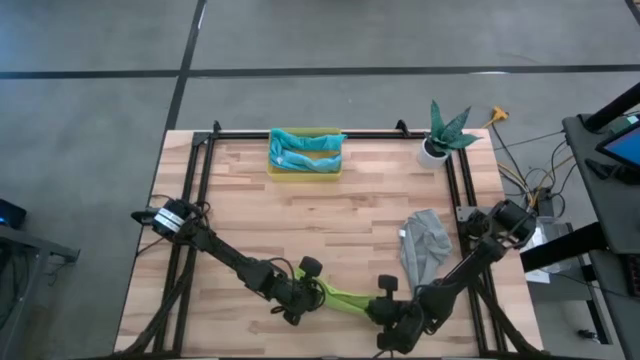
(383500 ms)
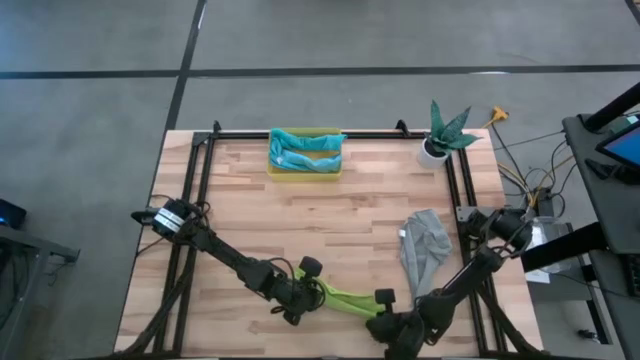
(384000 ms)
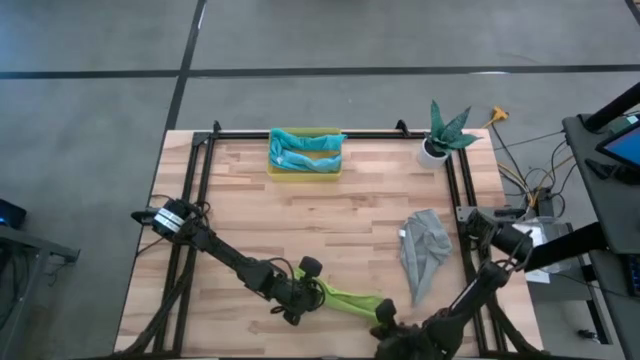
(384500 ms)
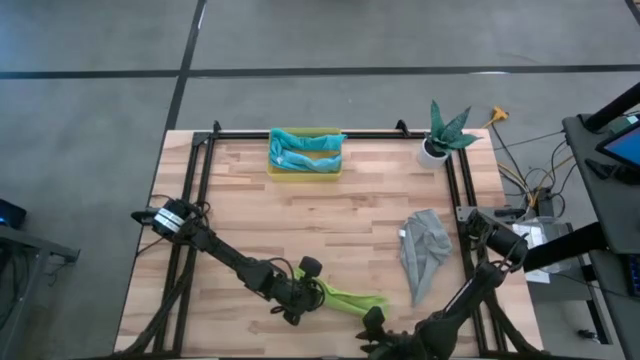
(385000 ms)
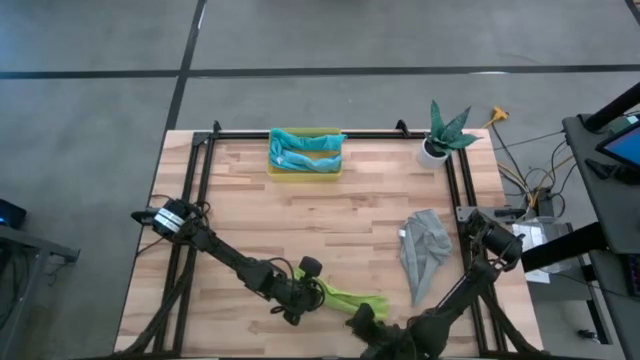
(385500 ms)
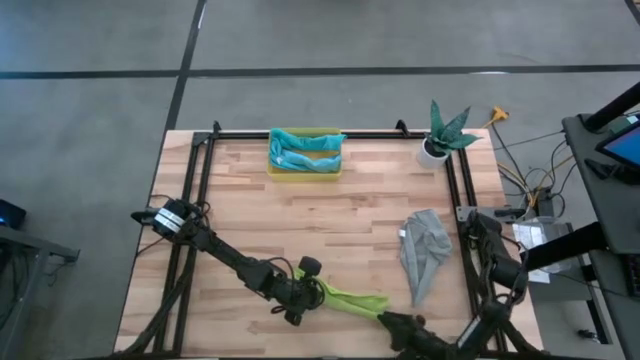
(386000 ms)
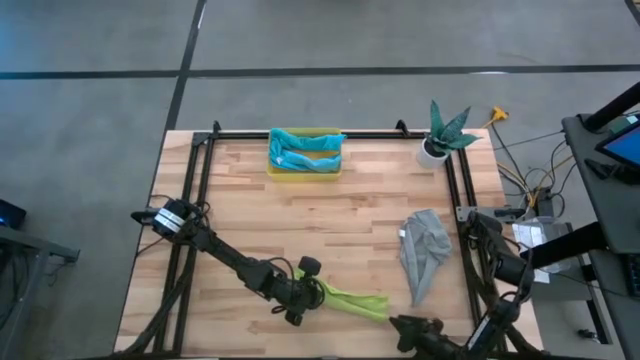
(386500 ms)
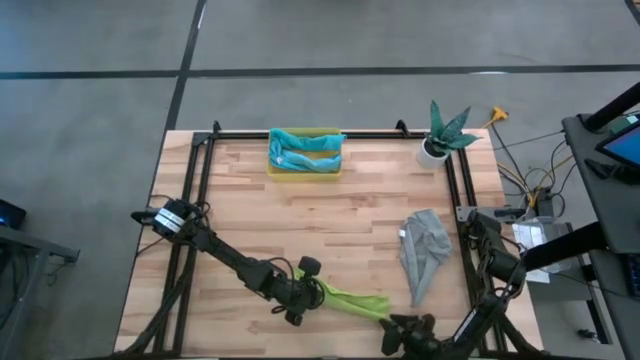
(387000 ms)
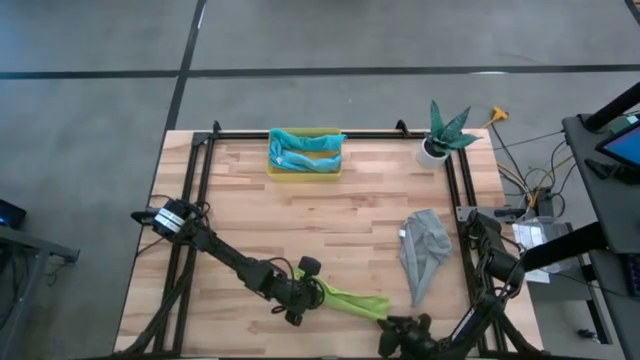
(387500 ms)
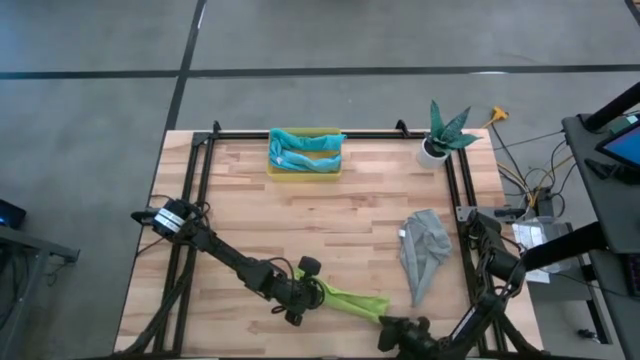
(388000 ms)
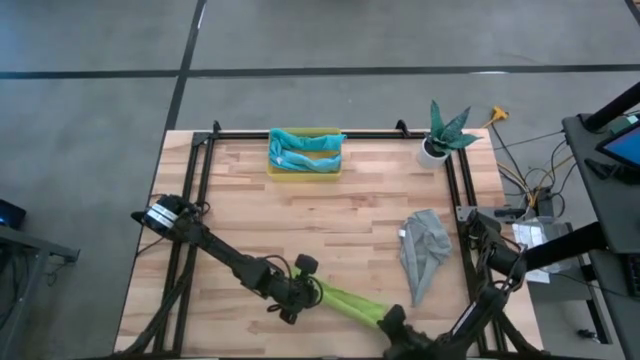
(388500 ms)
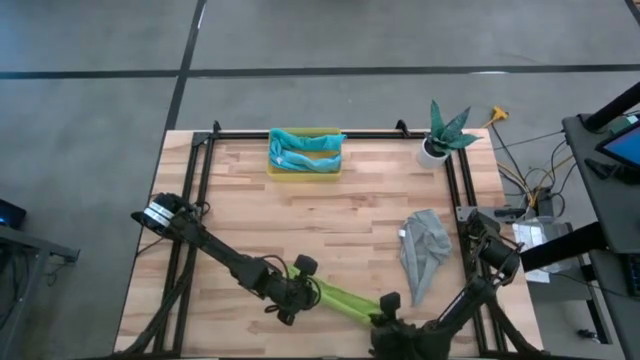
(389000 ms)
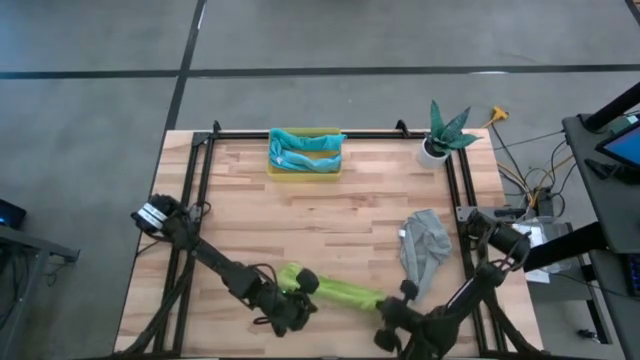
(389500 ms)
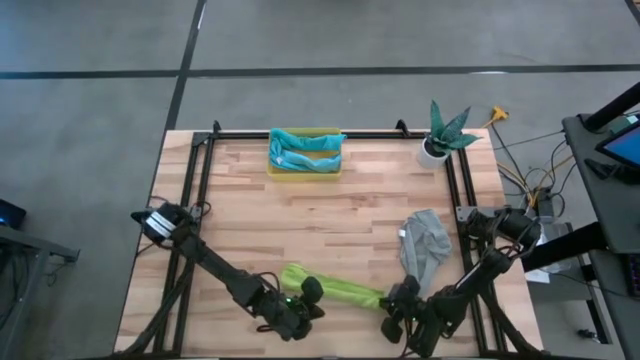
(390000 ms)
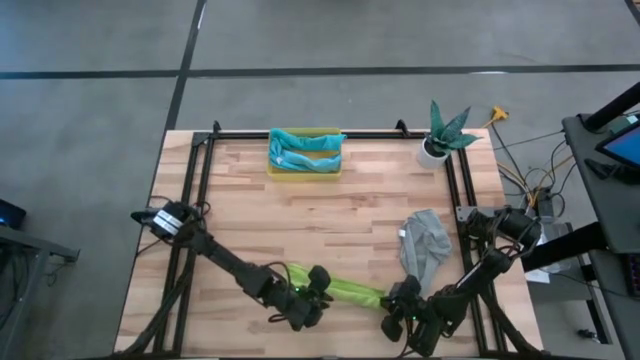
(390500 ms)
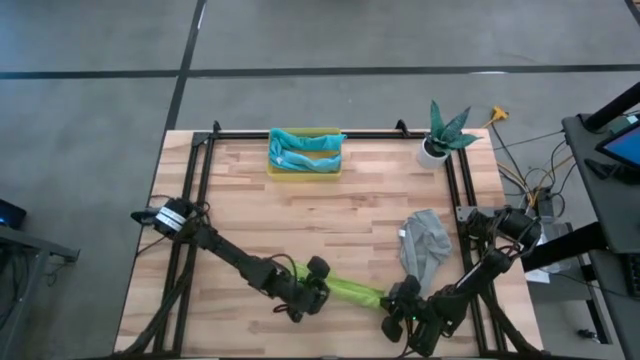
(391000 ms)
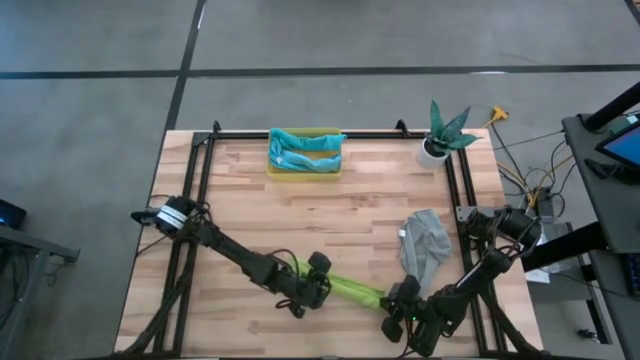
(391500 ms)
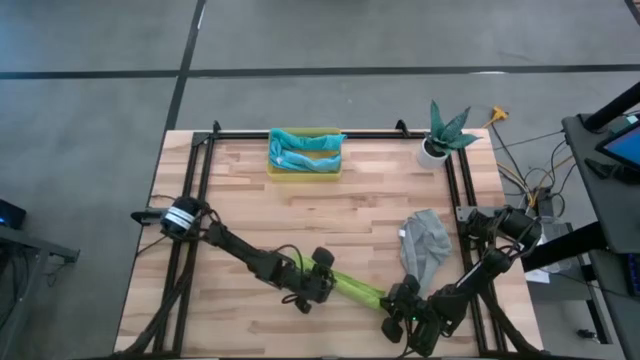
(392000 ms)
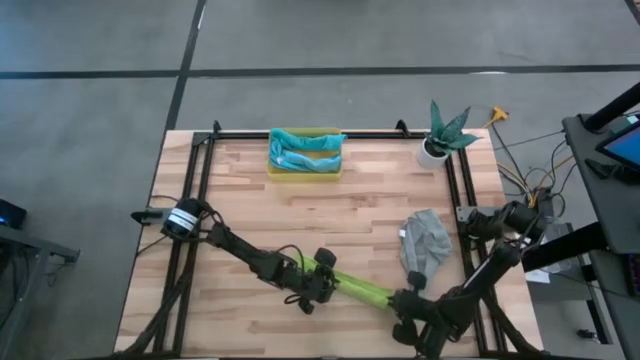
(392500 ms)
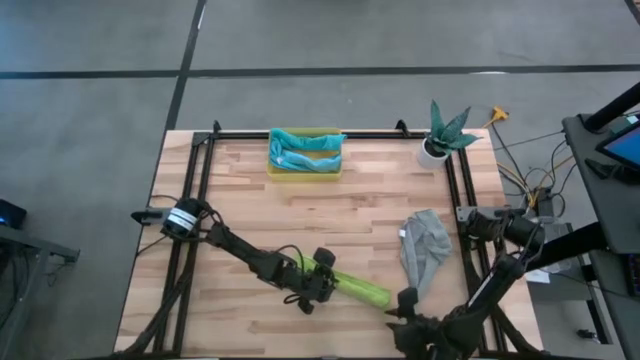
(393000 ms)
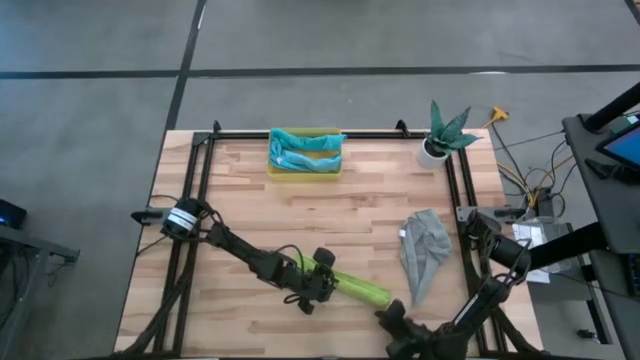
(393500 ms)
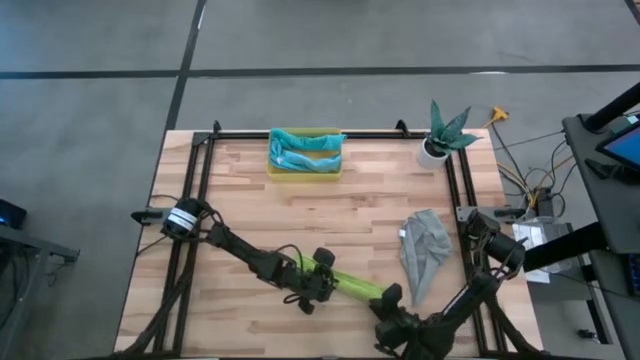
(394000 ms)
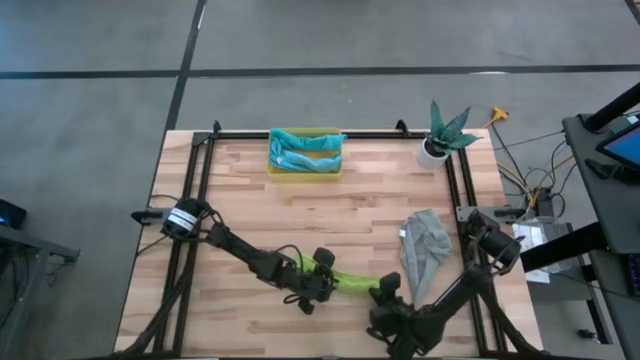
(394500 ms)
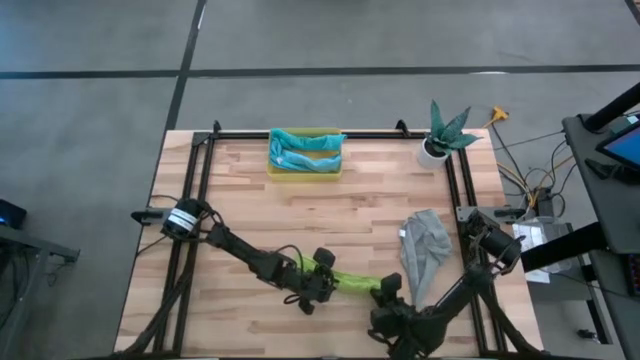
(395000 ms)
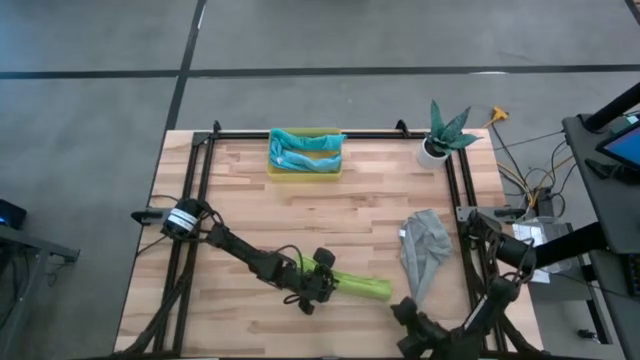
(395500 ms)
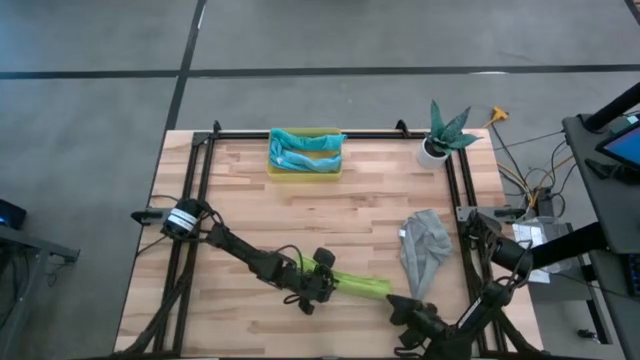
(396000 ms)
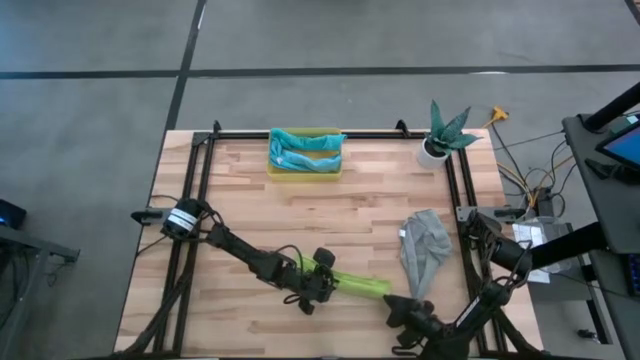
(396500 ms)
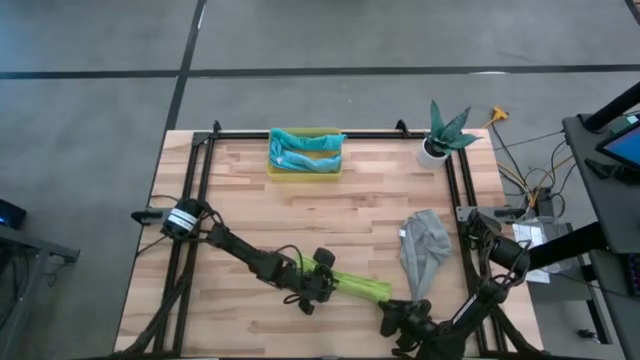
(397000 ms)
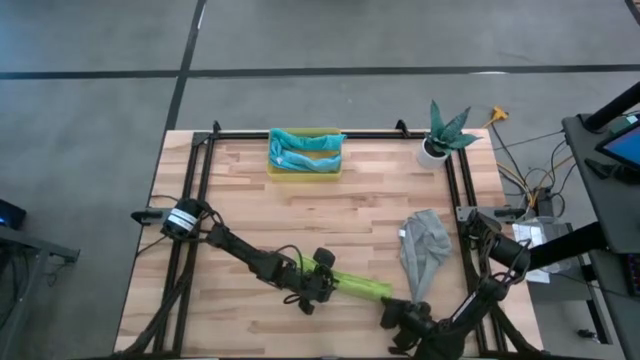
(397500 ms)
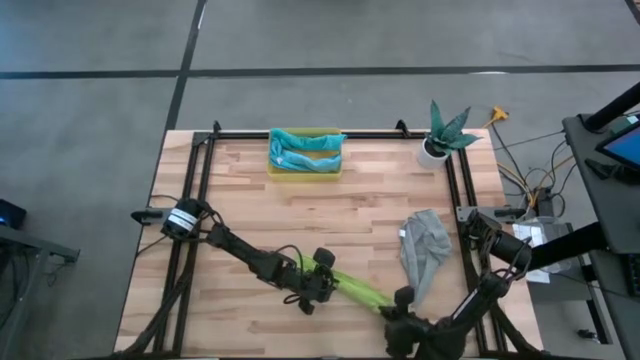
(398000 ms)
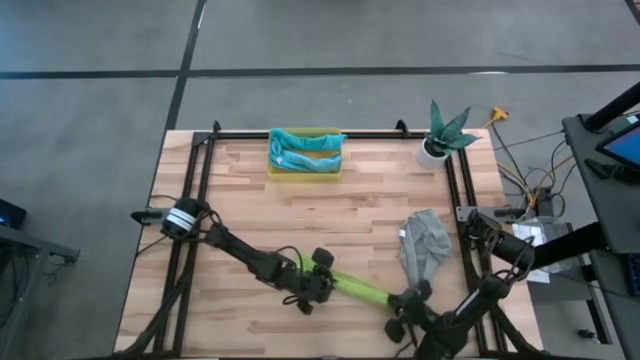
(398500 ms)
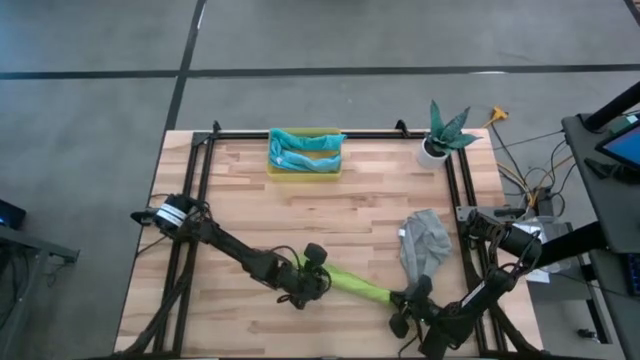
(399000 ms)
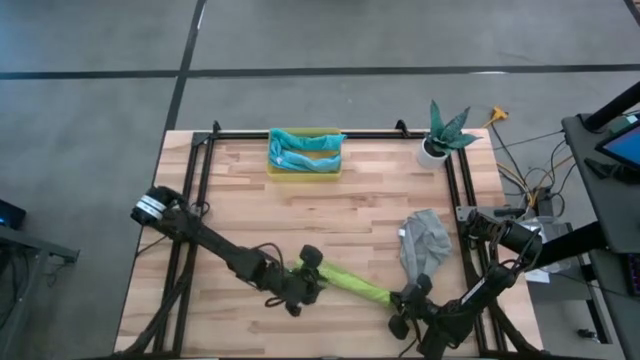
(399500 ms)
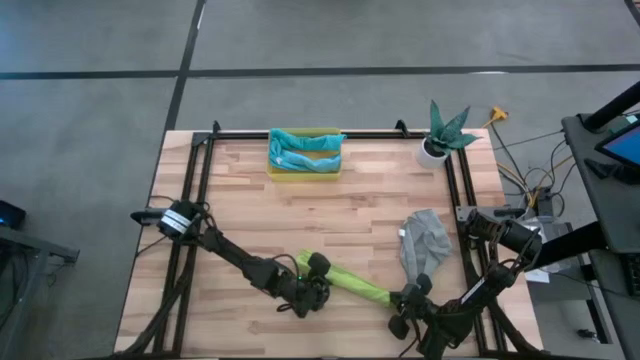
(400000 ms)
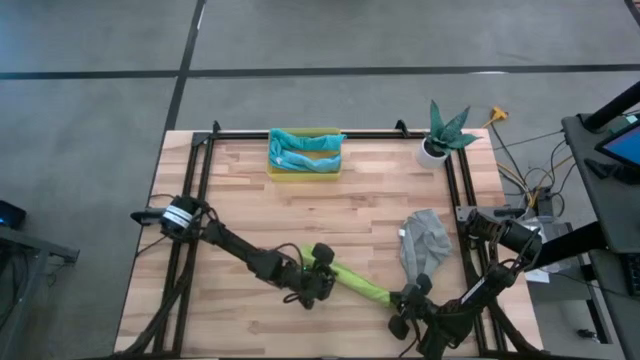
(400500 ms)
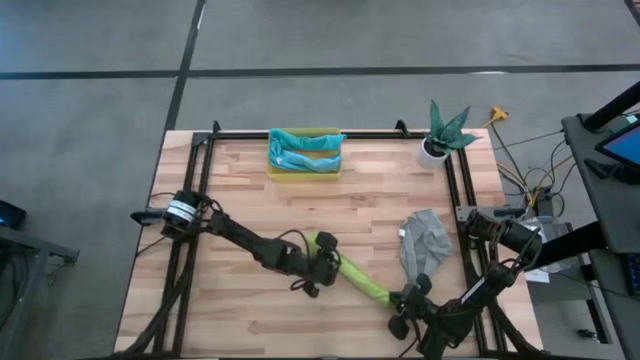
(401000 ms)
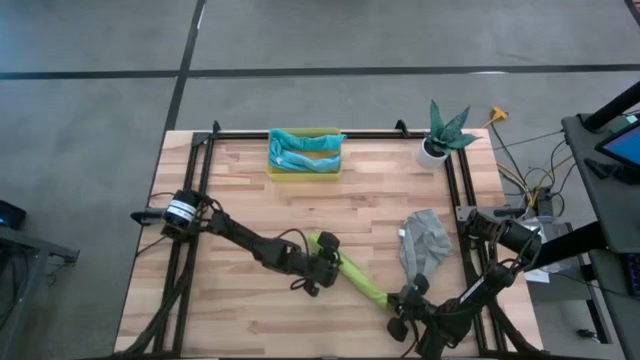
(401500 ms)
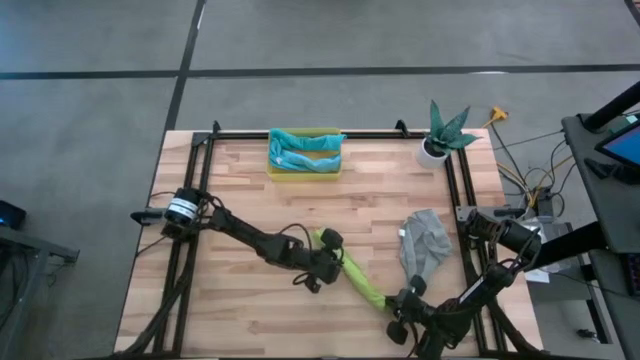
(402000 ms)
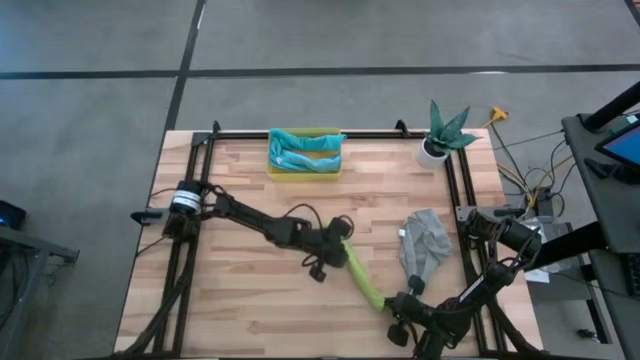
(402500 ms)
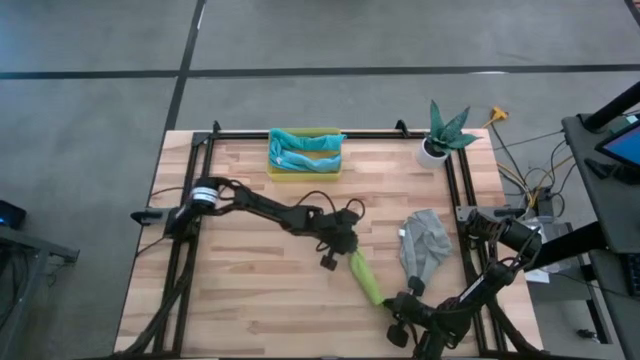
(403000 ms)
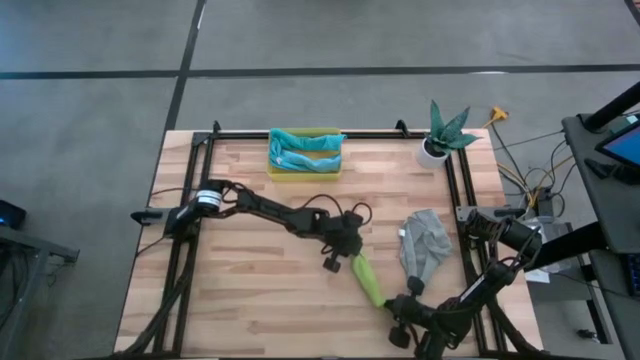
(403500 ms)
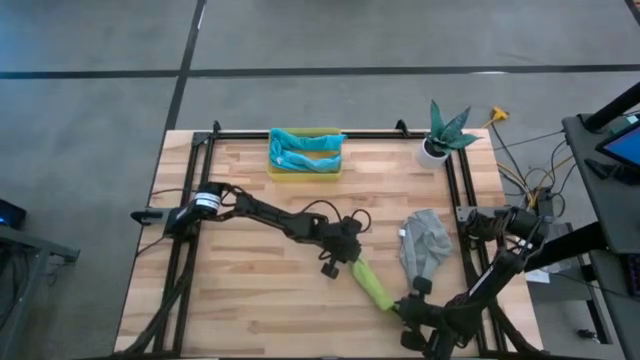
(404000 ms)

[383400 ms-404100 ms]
Task: Roll microfiber towels into tight, uniform cylinder then place into a basket
Roll the green towel
